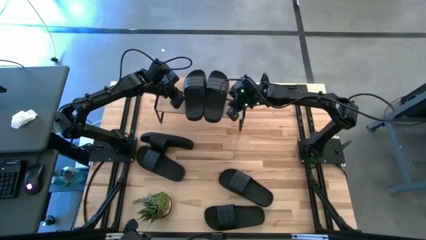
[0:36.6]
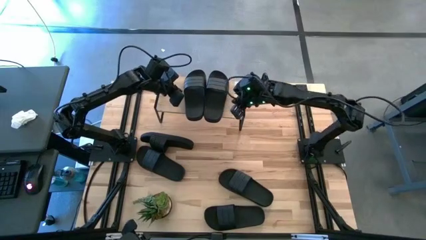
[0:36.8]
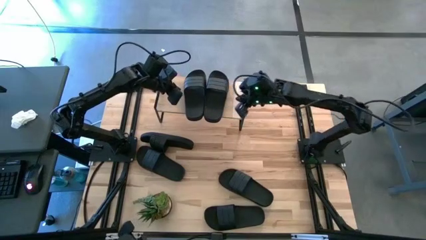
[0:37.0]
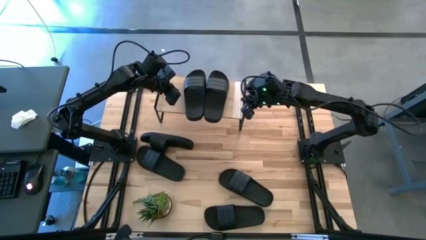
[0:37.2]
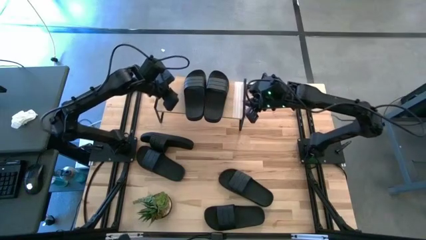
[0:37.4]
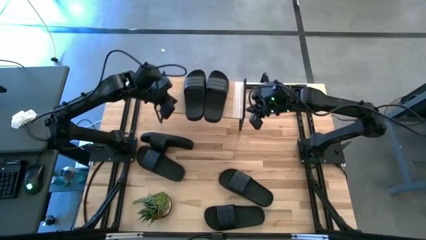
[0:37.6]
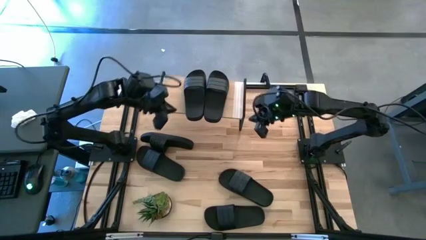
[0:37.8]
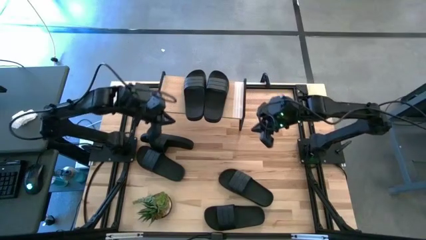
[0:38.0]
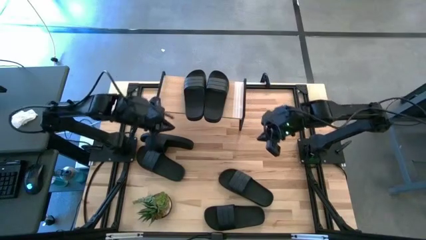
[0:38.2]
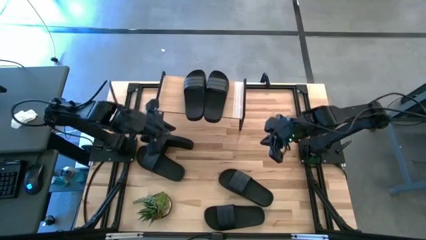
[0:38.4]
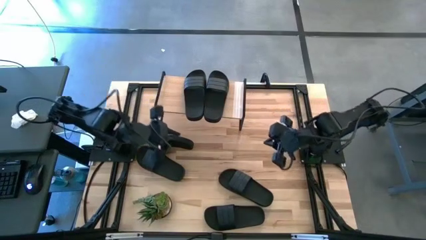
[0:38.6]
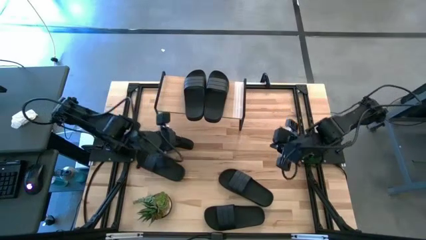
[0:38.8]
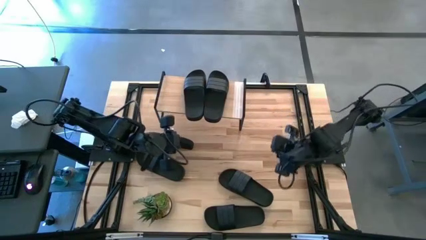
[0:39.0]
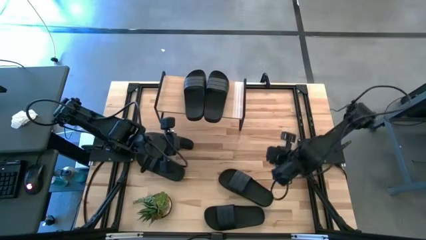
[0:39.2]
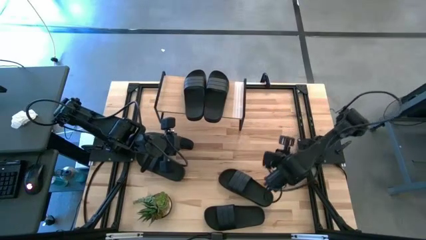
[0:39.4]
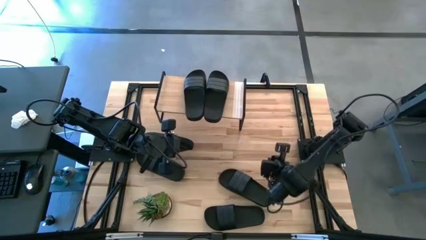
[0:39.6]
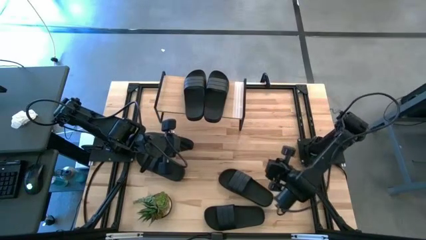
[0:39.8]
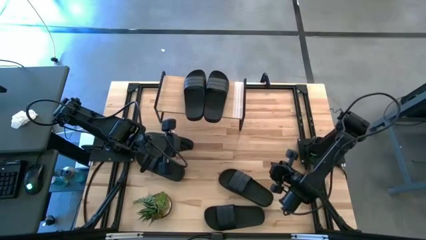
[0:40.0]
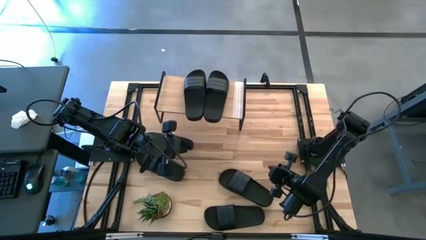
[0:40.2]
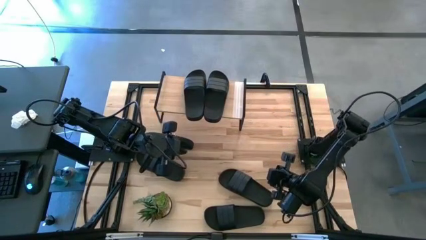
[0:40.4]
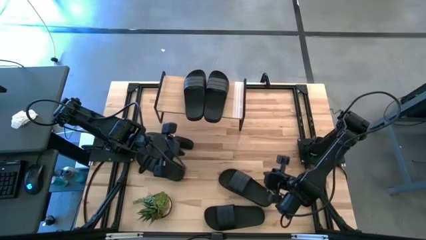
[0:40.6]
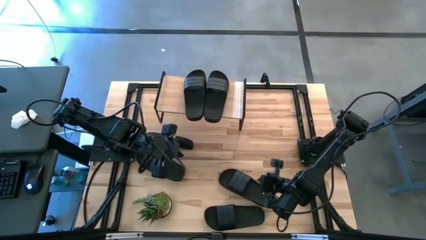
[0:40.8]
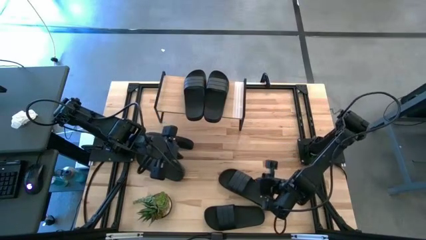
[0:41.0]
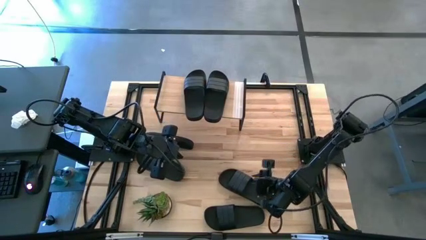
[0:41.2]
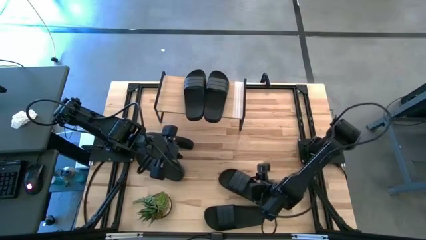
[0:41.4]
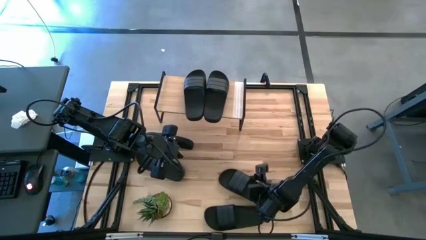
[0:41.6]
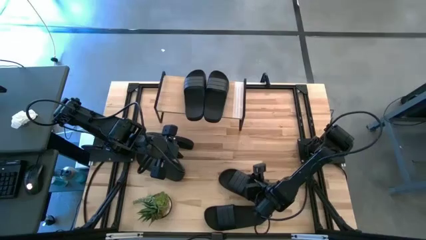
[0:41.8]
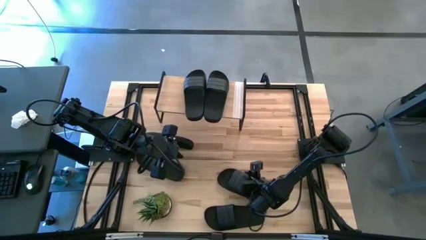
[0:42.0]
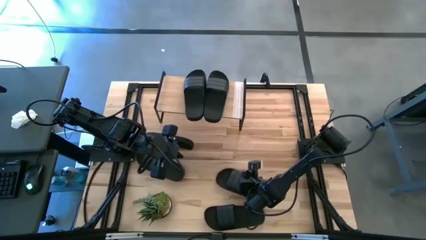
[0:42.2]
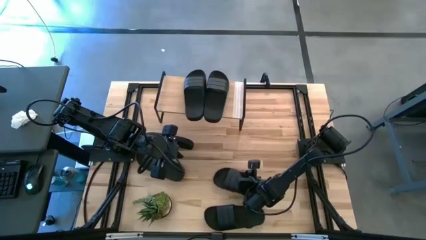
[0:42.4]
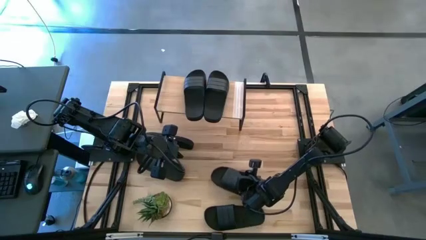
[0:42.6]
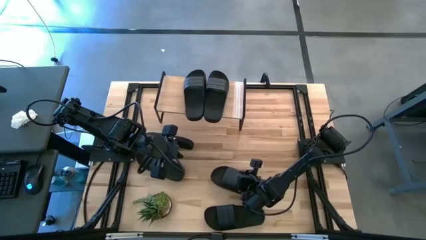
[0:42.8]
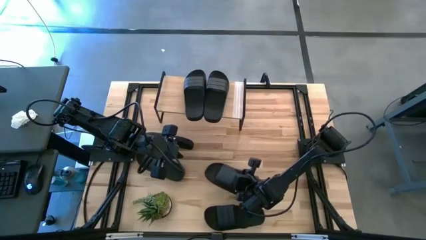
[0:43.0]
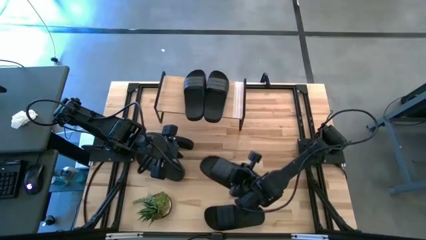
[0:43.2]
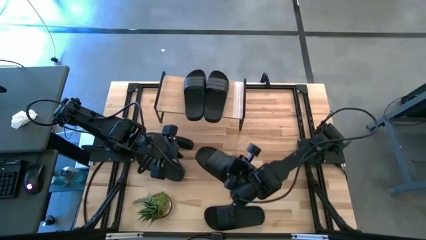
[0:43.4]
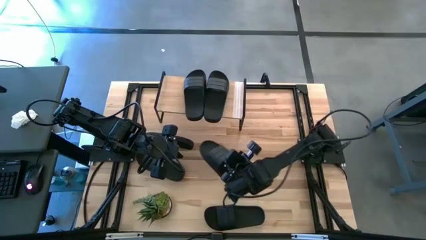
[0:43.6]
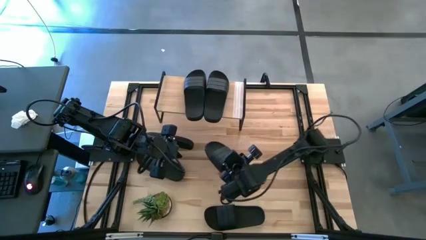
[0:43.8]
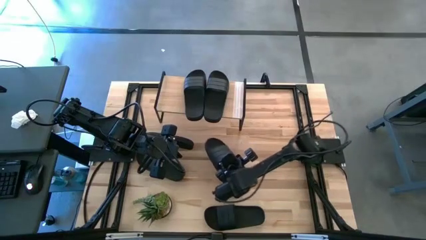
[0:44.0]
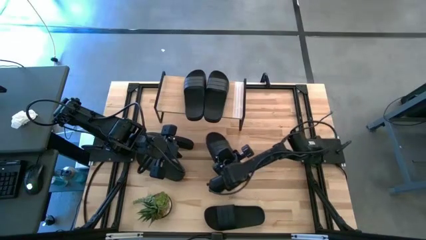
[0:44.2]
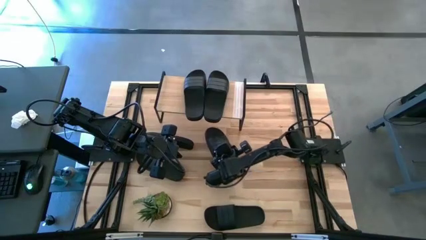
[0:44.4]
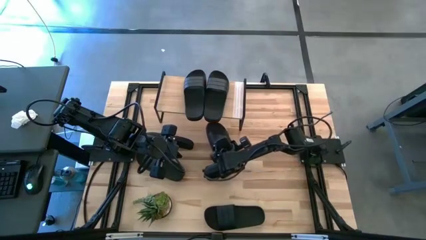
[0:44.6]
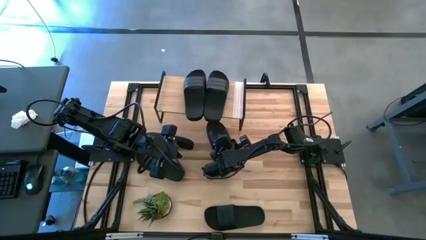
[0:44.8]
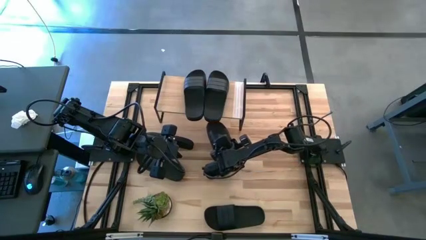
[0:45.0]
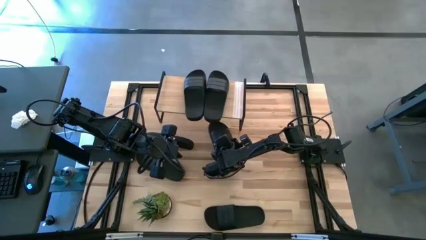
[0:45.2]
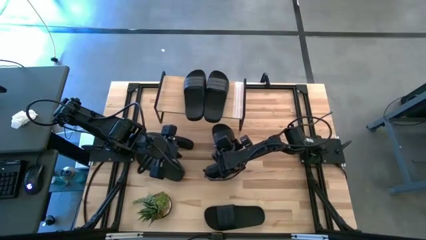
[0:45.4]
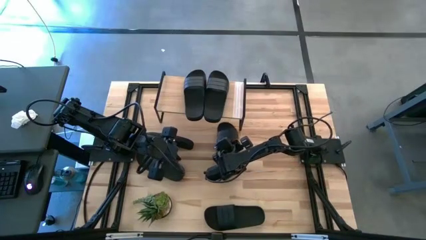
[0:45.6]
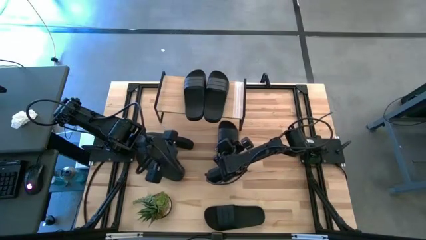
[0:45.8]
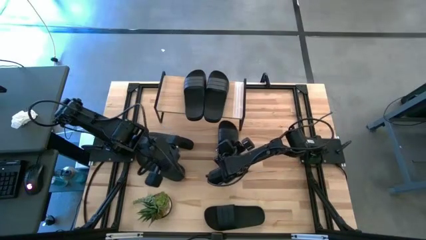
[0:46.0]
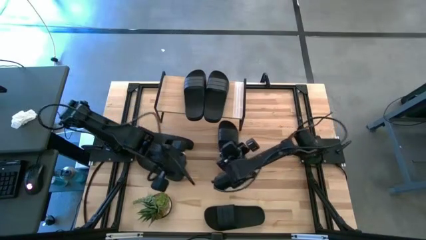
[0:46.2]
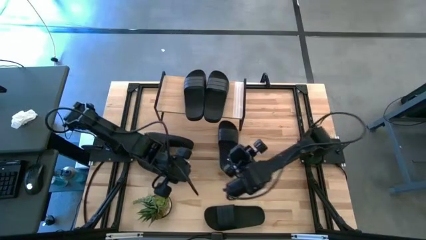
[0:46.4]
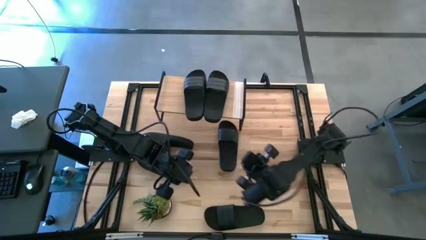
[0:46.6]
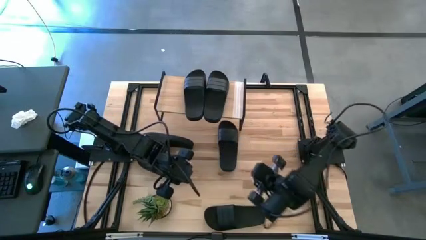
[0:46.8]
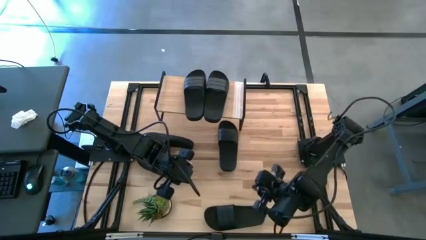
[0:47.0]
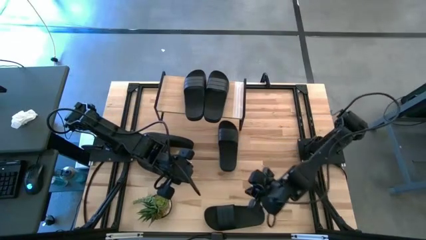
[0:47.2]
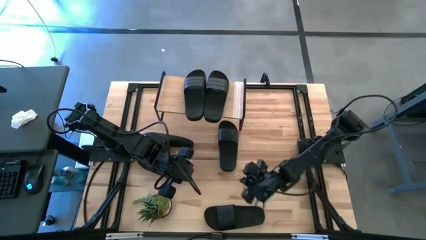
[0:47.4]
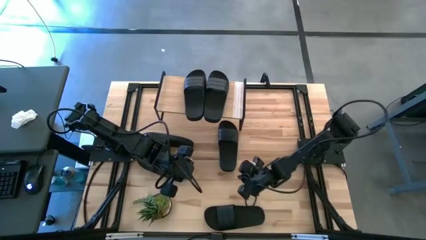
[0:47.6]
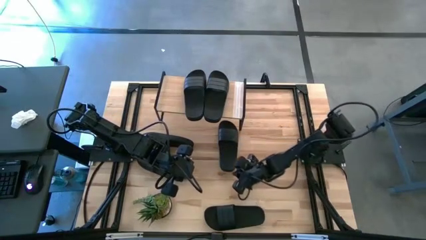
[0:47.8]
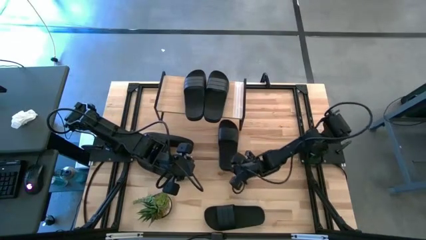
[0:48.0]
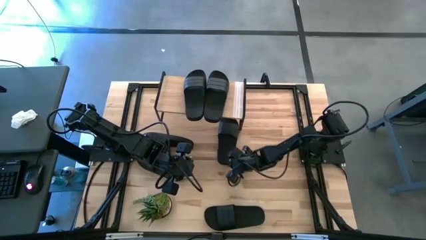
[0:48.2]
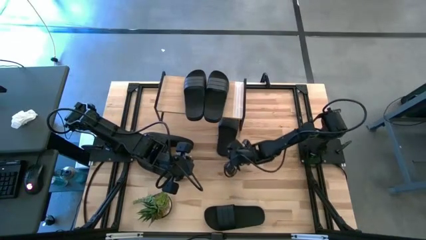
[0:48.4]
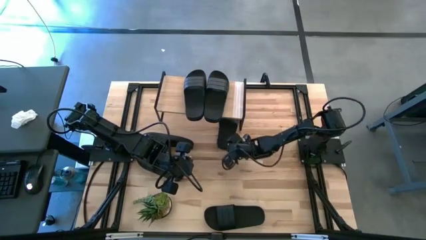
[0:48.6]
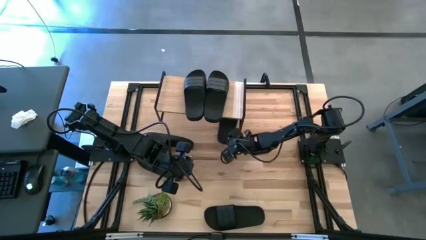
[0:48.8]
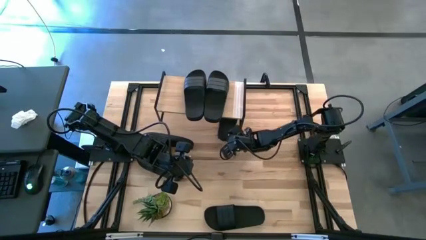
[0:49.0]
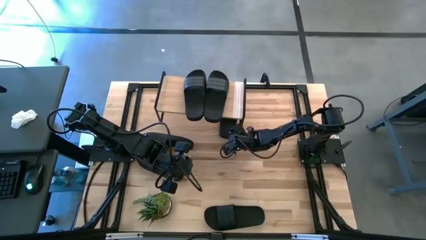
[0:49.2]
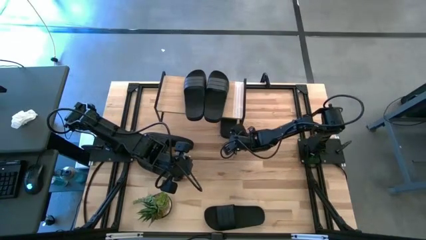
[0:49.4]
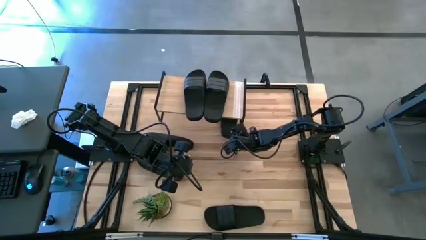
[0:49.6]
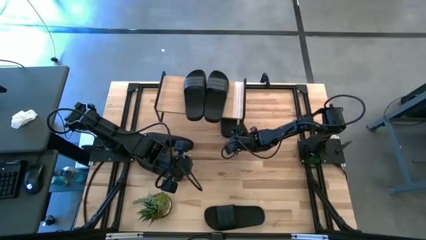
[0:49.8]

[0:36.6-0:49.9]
Task: Pick and place slides into the shelf
Put the black slide under the shelf

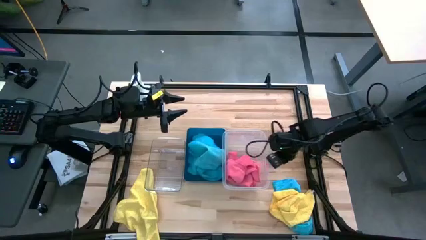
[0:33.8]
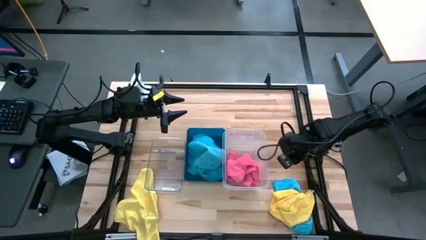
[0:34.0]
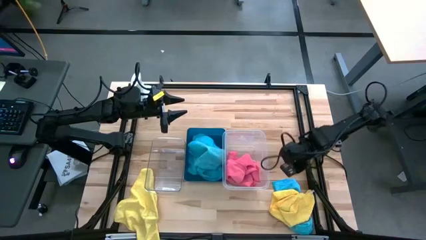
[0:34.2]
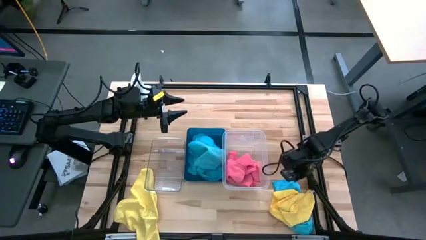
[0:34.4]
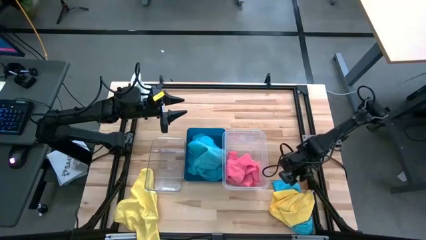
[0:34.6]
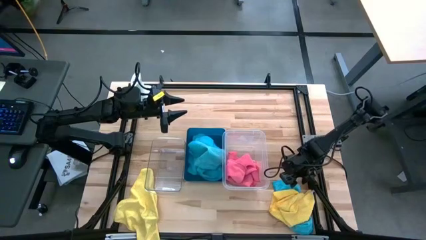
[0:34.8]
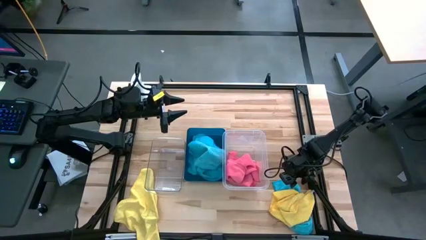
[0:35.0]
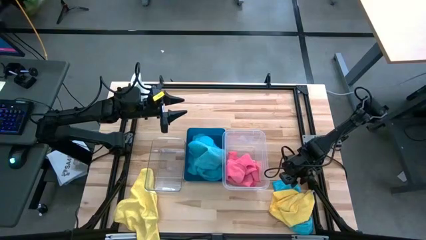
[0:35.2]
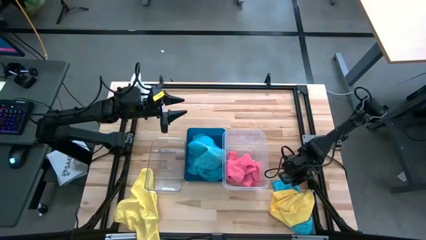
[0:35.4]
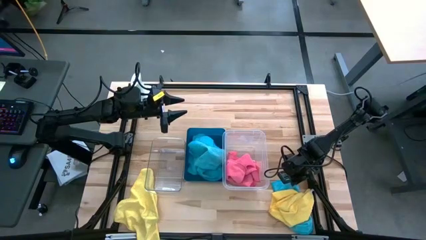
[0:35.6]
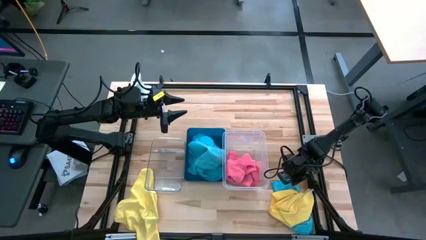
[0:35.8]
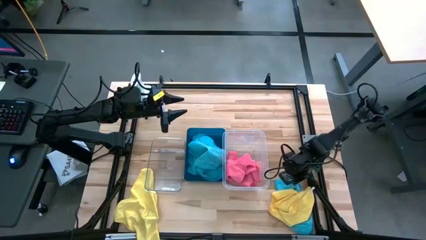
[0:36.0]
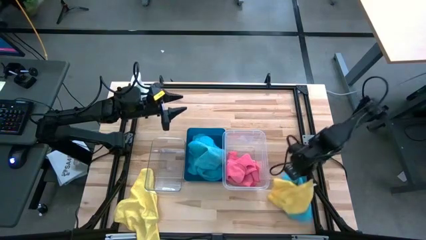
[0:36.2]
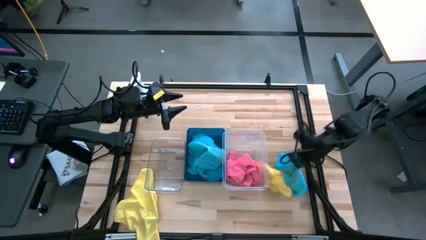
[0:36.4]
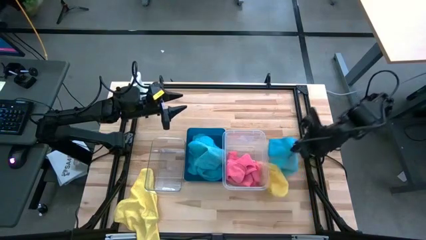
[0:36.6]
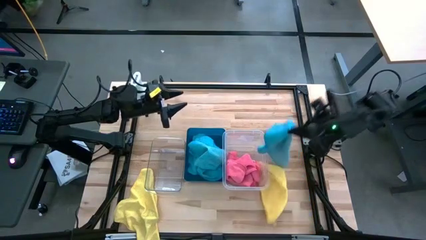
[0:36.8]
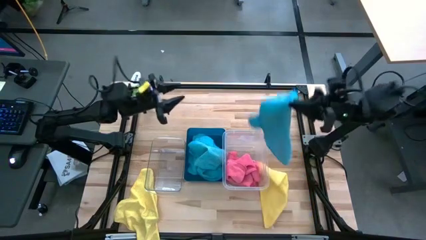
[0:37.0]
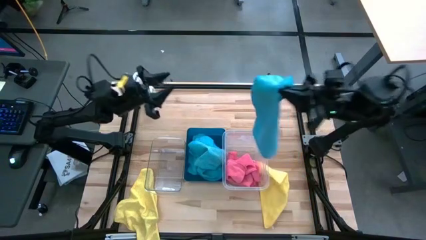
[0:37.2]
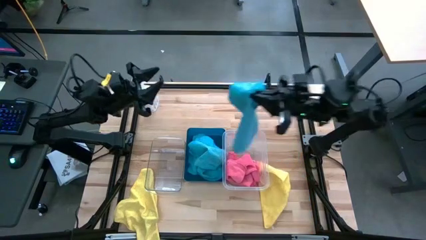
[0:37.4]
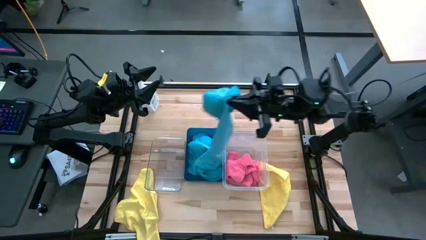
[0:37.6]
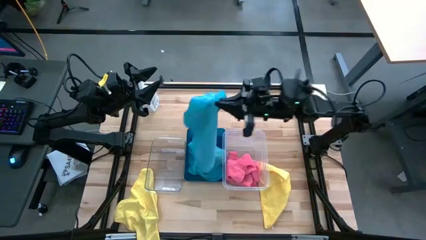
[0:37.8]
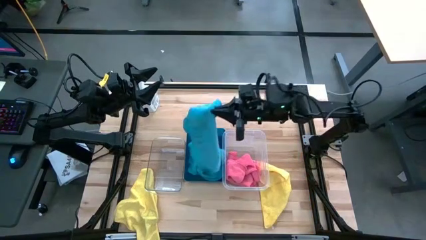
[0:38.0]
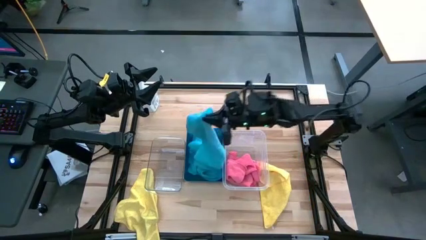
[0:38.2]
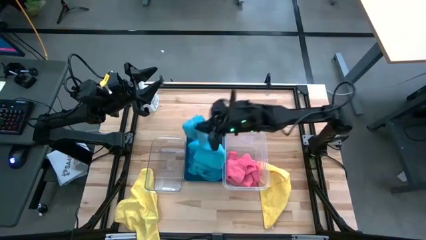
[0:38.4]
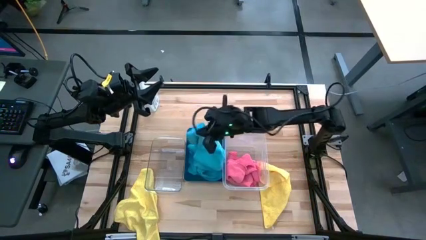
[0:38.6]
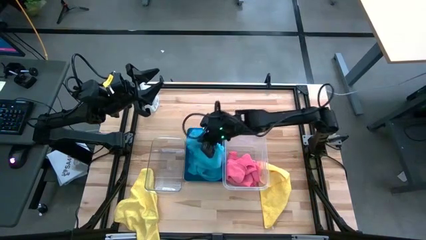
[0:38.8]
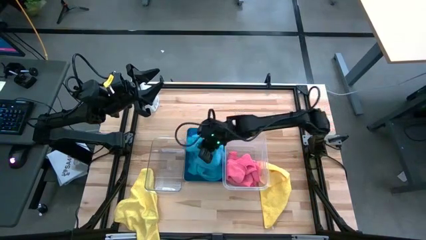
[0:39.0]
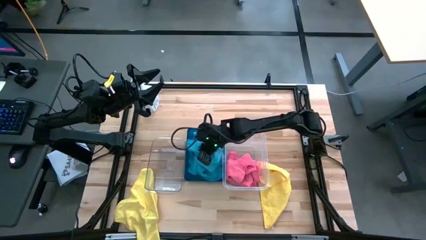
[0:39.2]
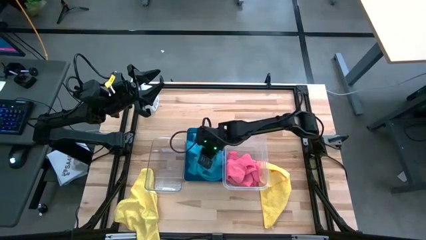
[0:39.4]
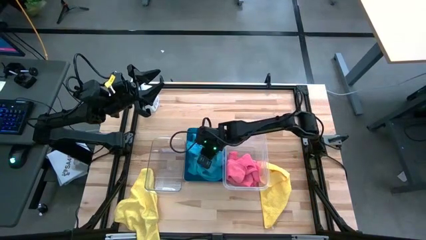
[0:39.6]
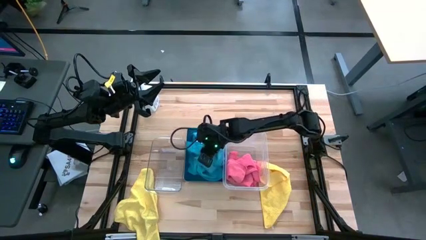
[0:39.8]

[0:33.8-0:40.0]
Task: Sort microfiber towel by color & place in baskets
Put the blue microfiber cloth into the dark blue bin
